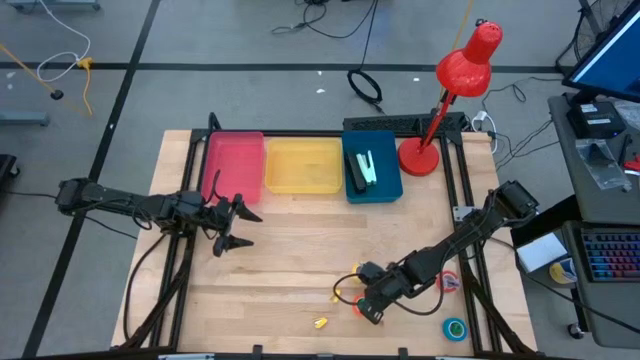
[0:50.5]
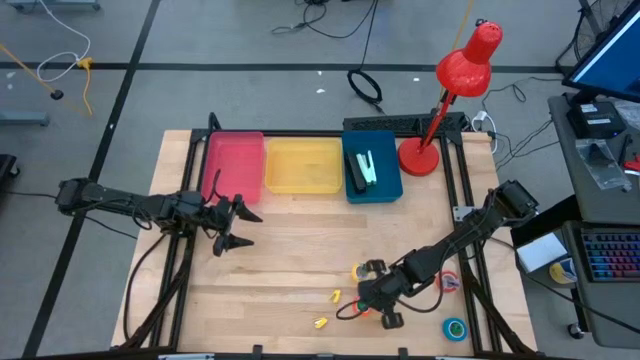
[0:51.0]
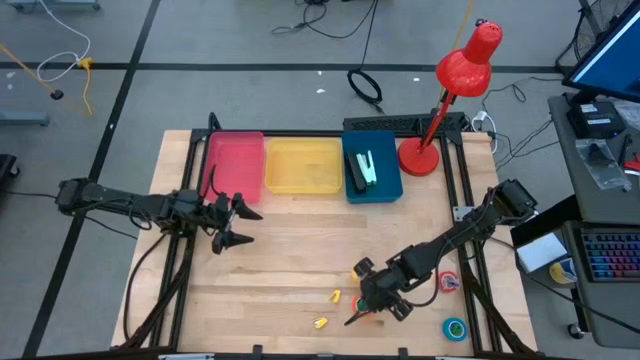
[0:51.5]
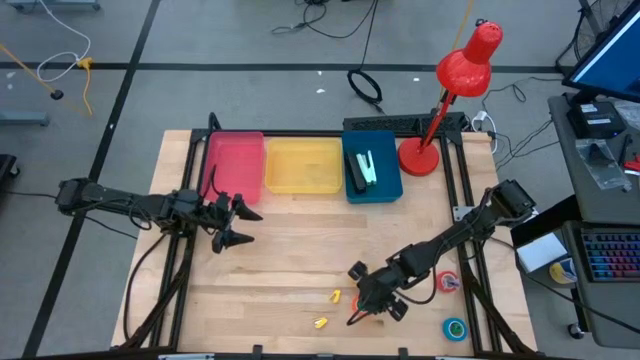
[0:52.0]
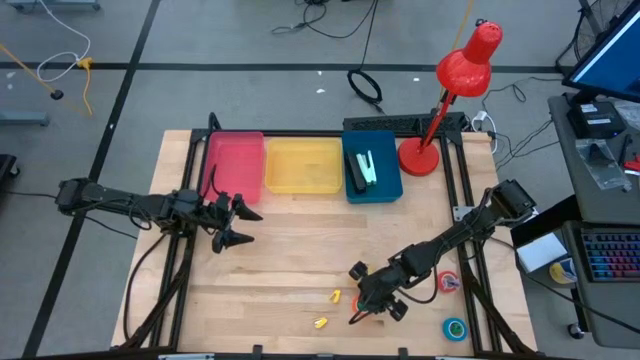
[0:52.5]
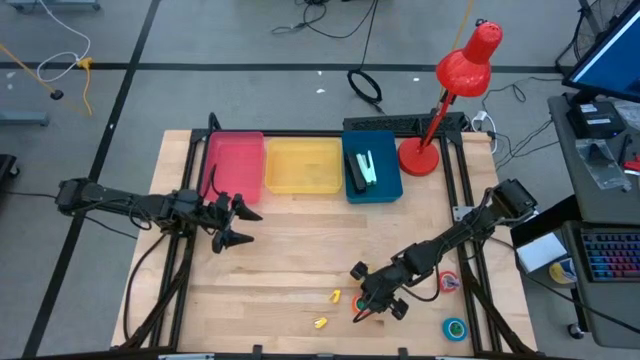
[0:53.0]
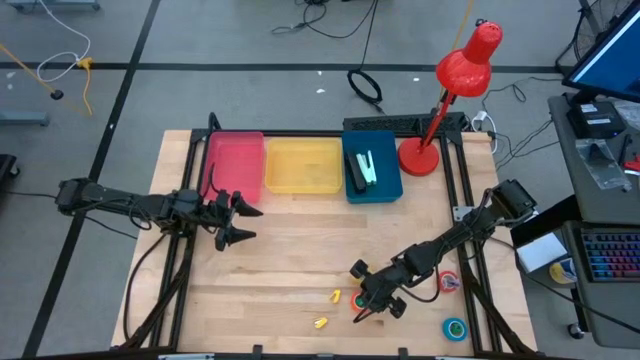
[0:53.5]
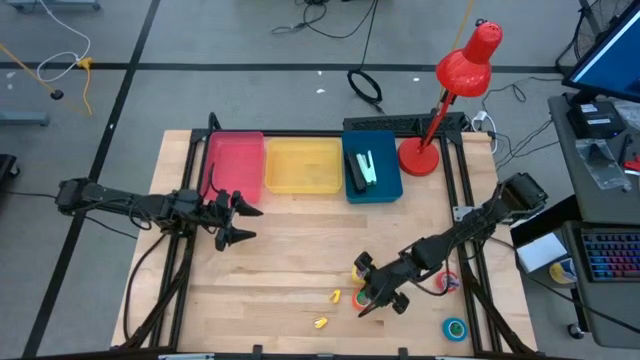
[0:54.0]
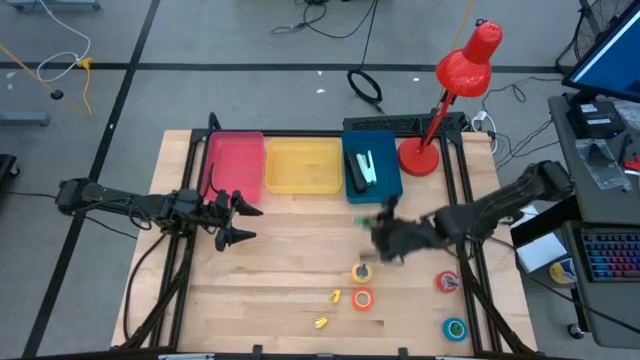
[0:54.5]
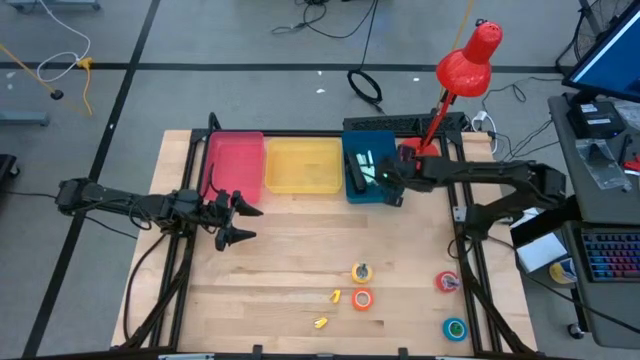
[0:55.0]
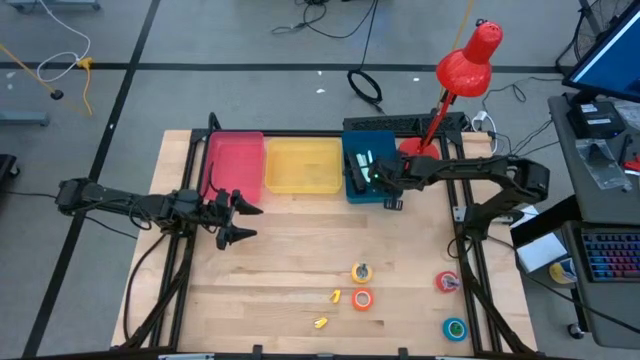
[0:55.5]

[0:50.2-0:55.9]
Task: Pick and place Stapler, Stapler remover, tape
Put the left green small stapler into the blue bin

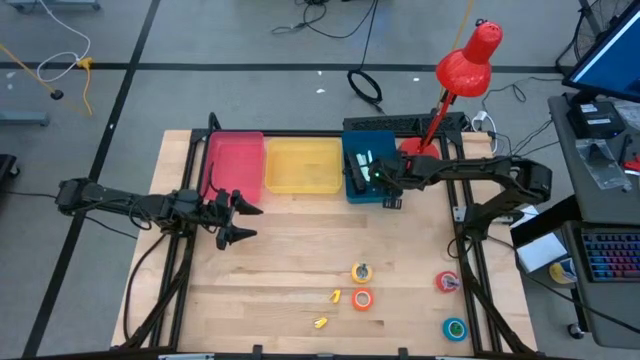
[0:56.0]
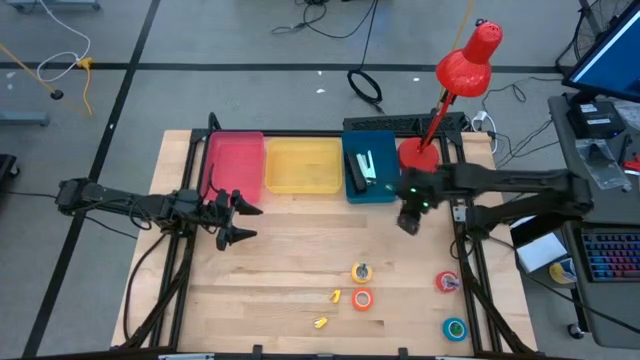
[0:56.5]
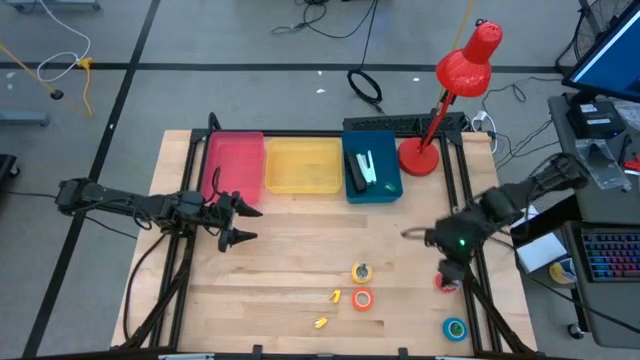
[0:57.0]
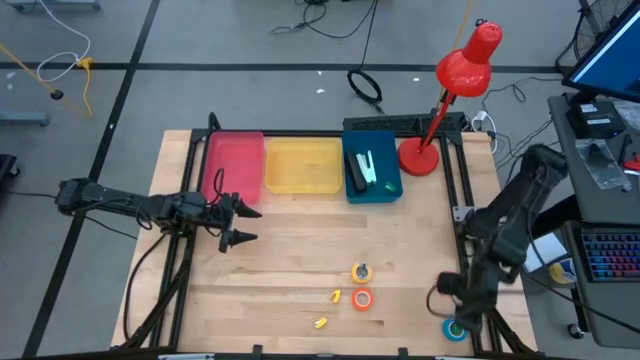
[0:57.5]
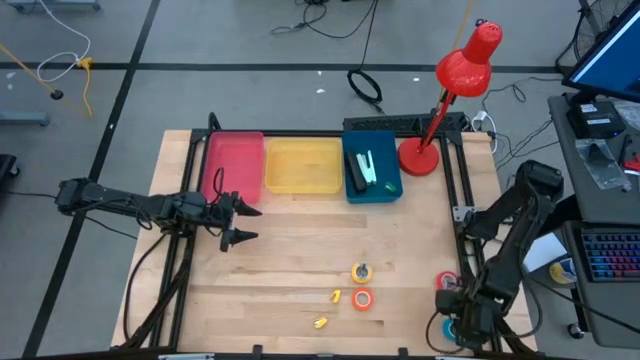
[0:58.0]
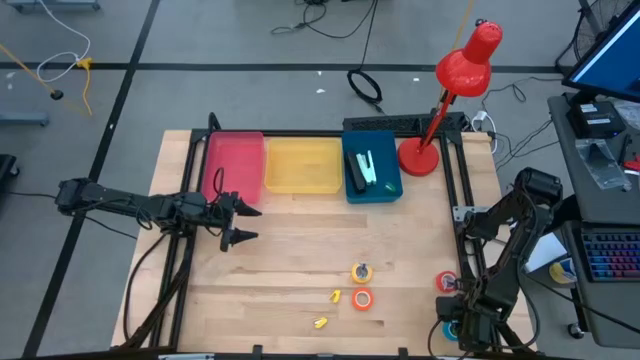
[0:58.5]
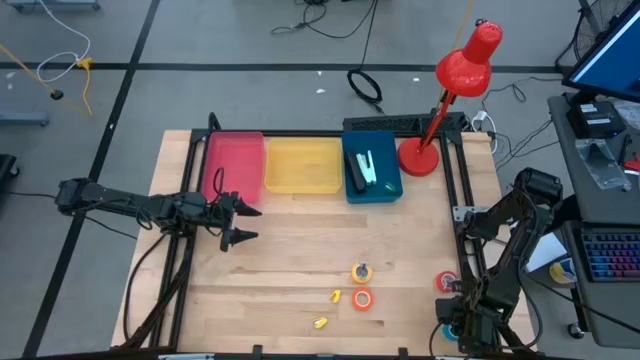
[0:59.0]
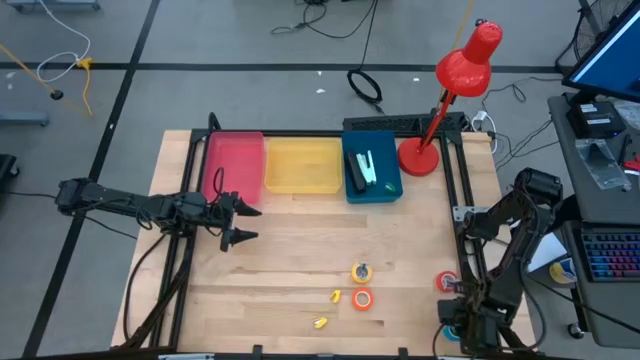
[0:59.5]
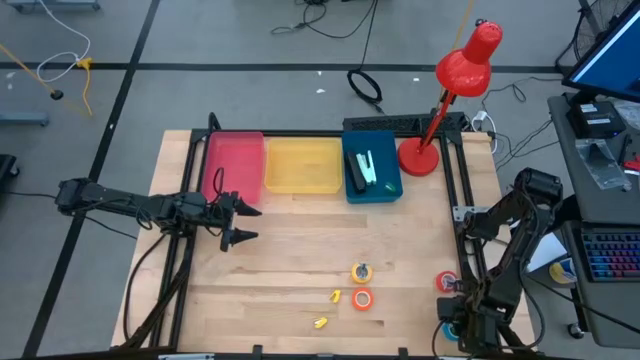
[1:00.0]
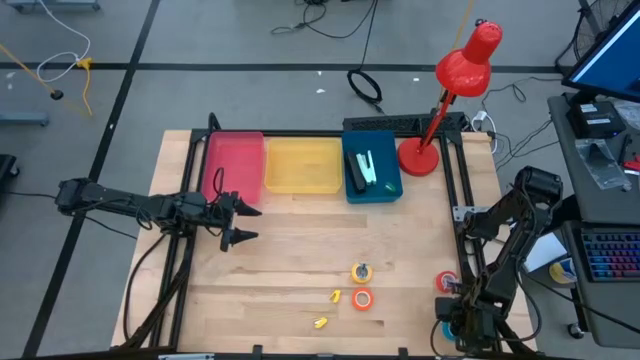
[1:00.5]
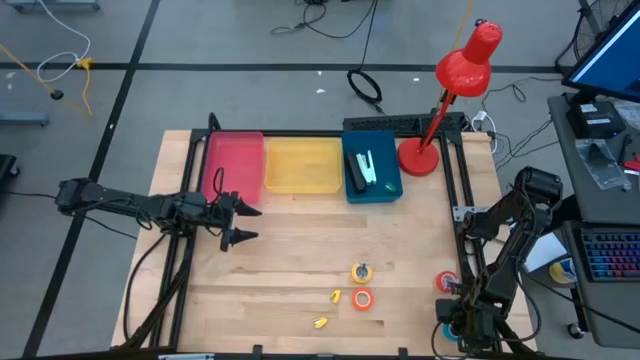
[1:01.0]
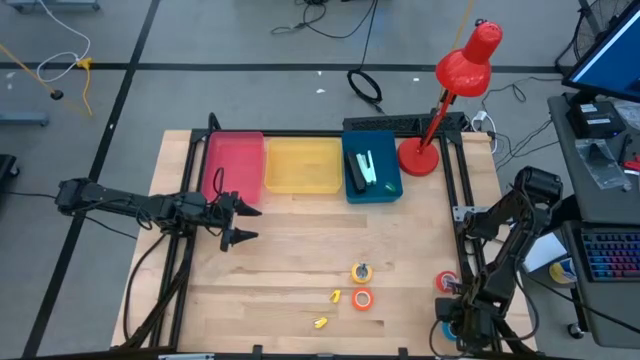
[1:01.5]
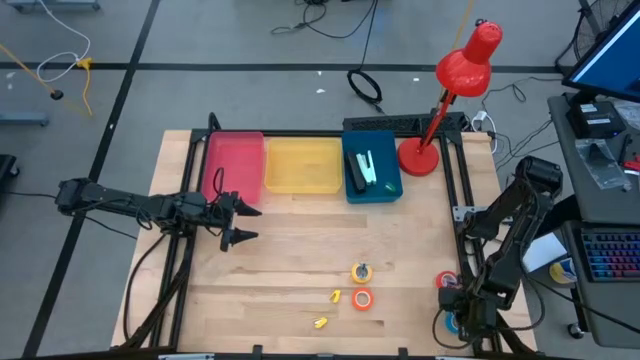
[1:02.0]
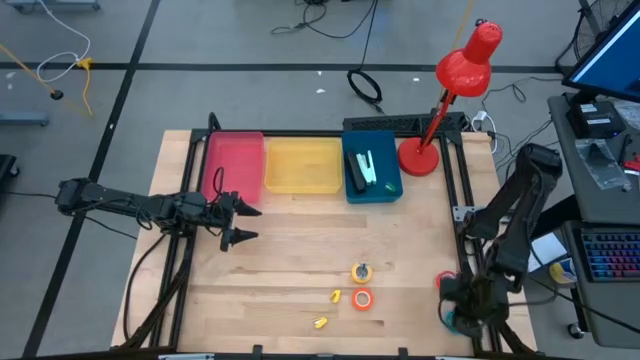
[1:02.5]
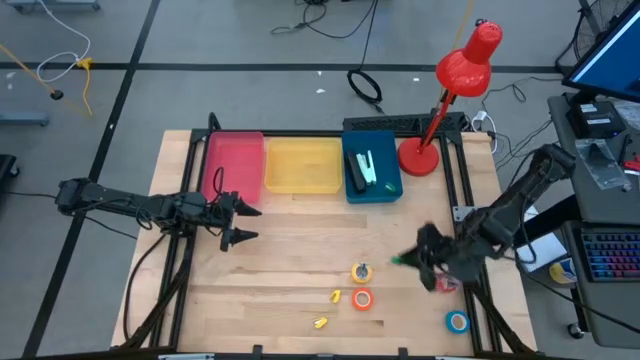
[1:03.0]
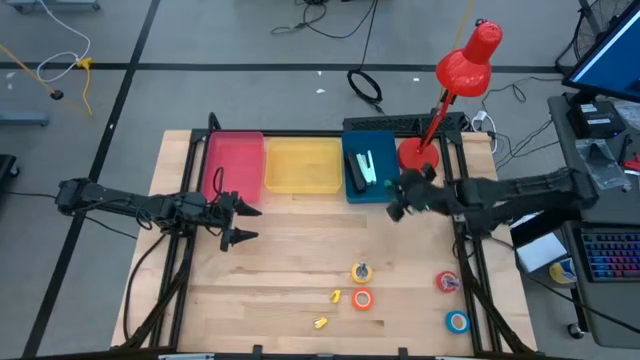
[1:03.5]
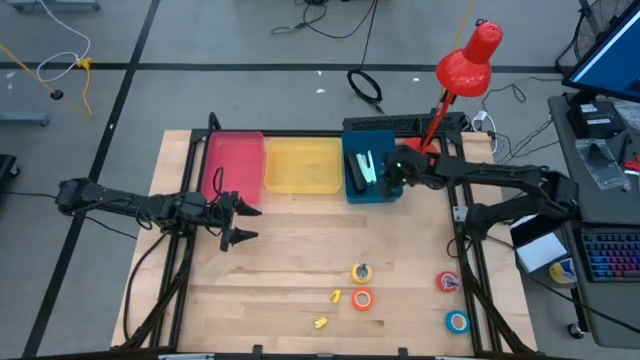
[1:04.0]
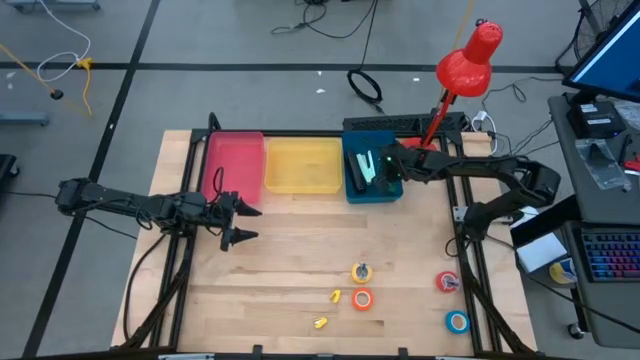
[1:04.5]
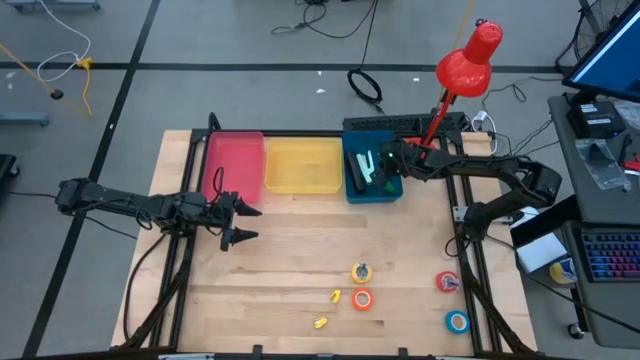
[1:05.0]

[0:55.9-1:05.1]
Put the green small stapler into the blue bin
